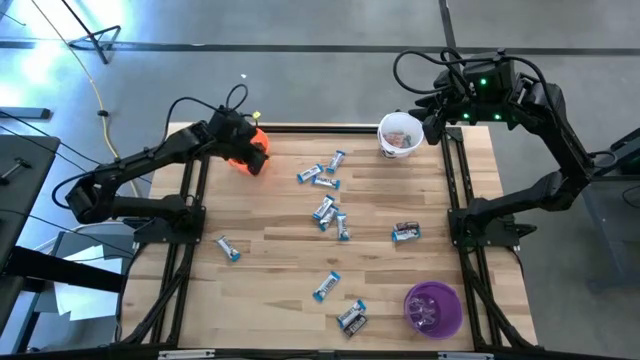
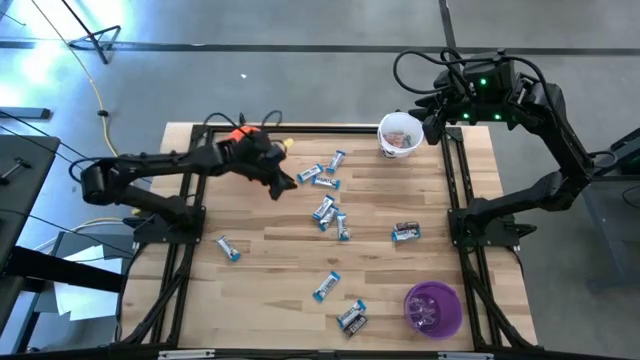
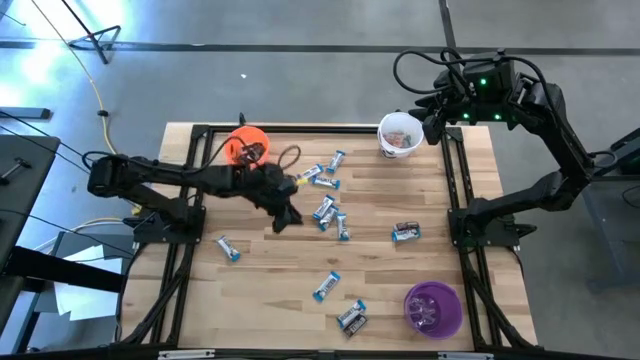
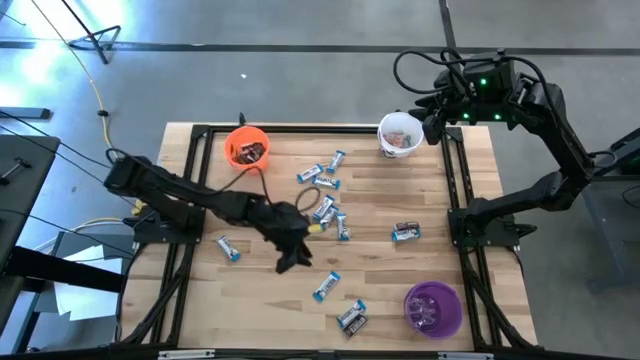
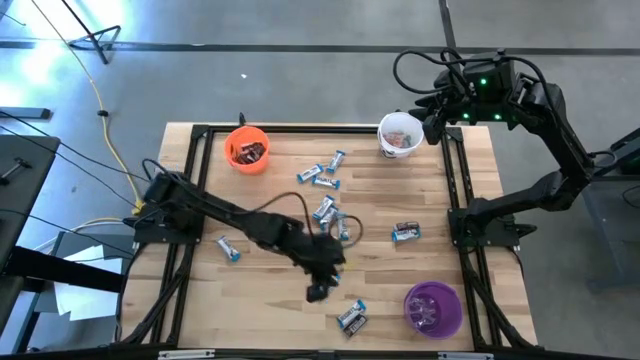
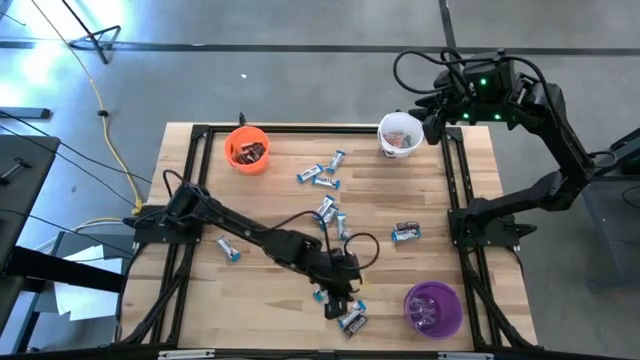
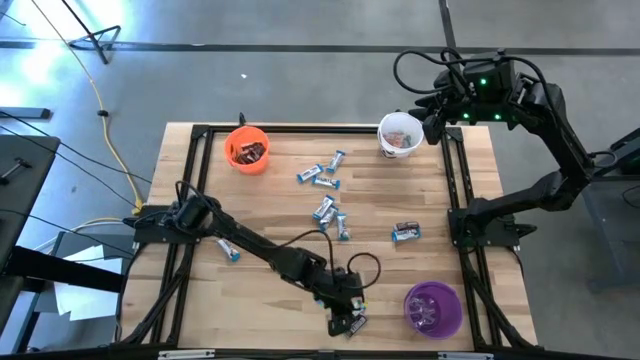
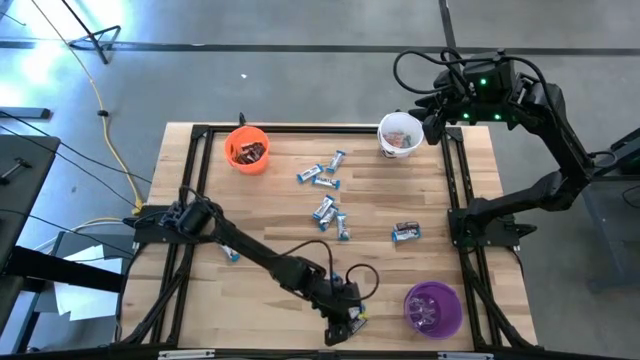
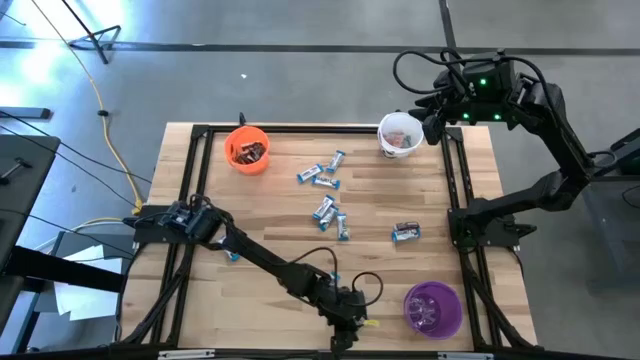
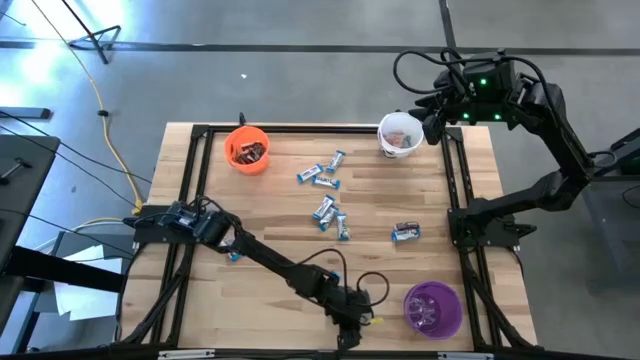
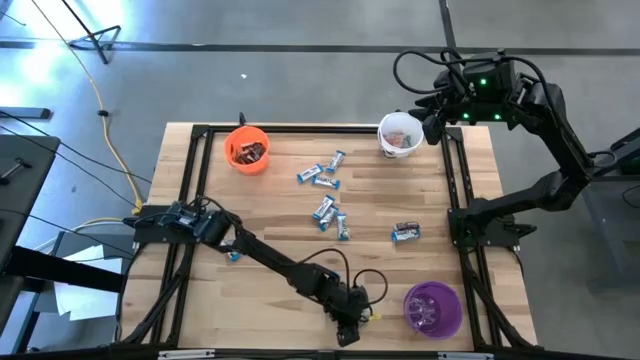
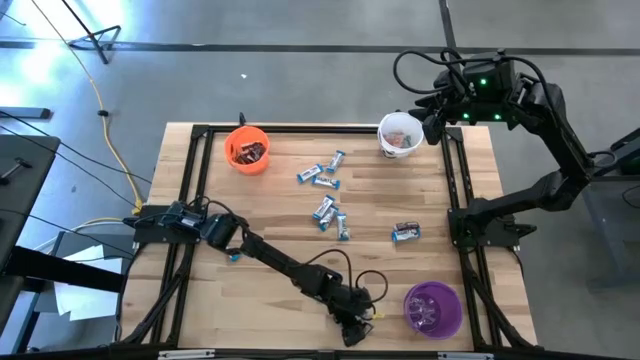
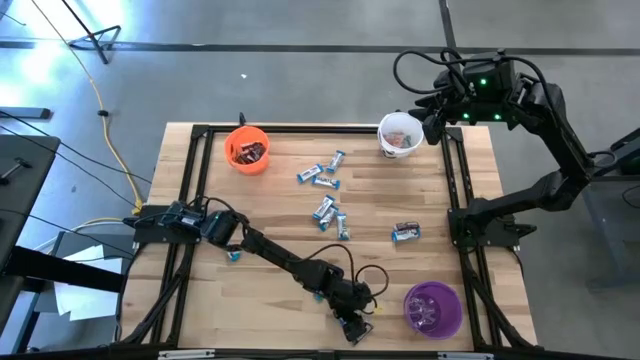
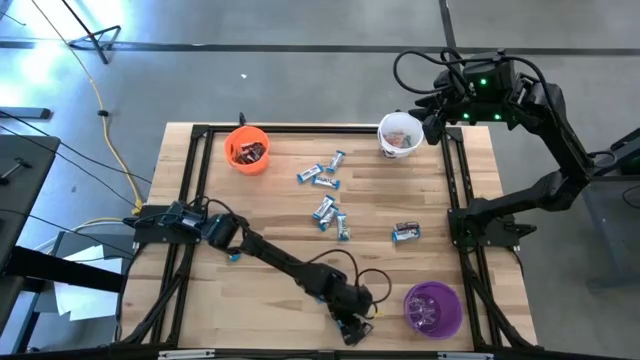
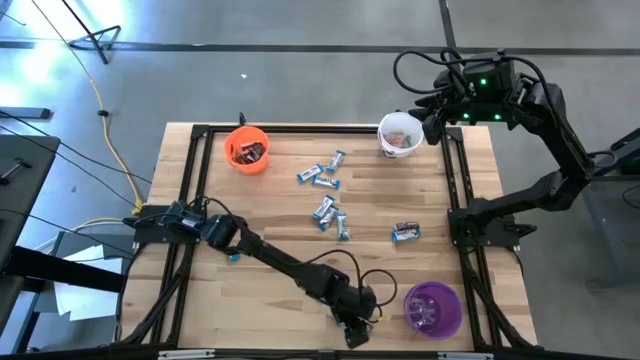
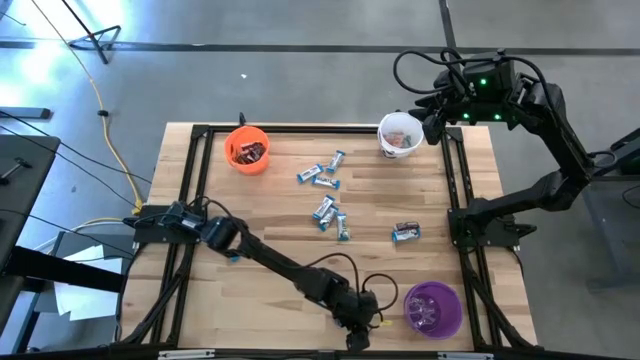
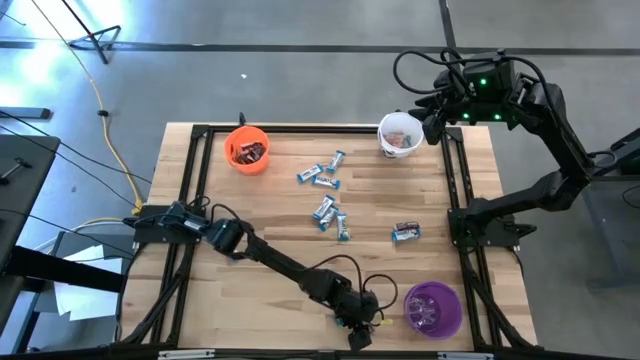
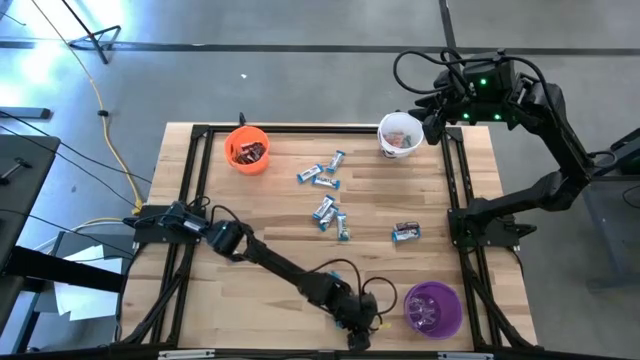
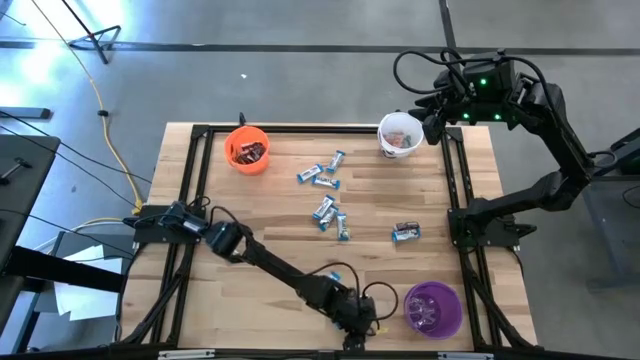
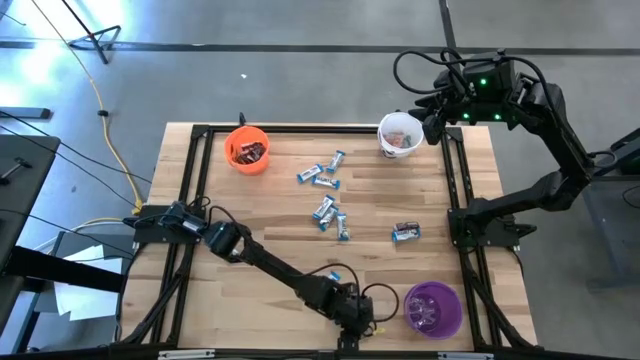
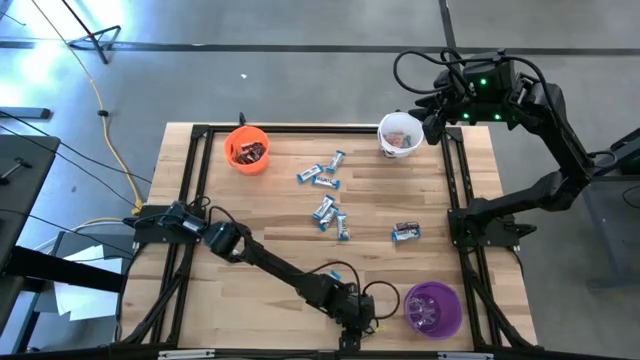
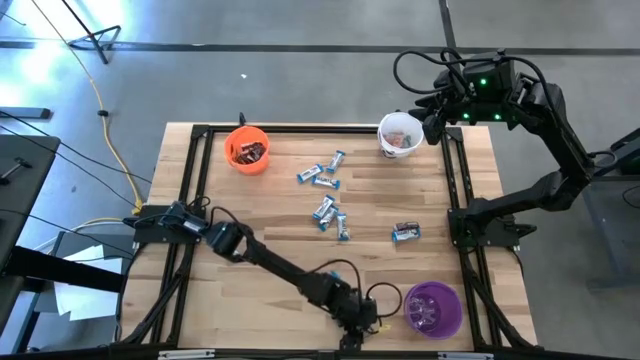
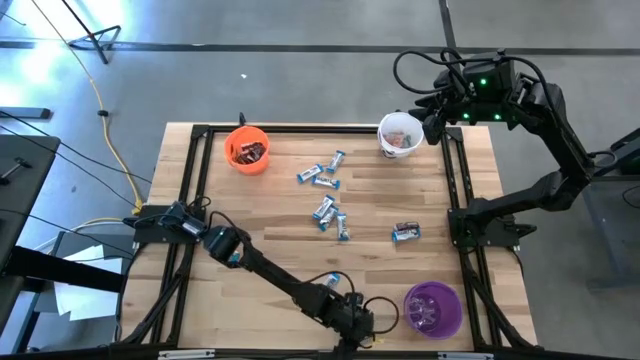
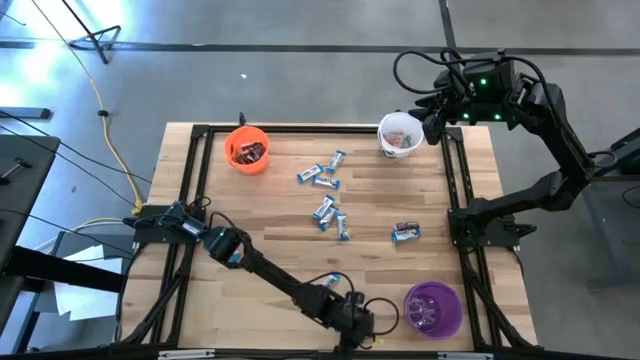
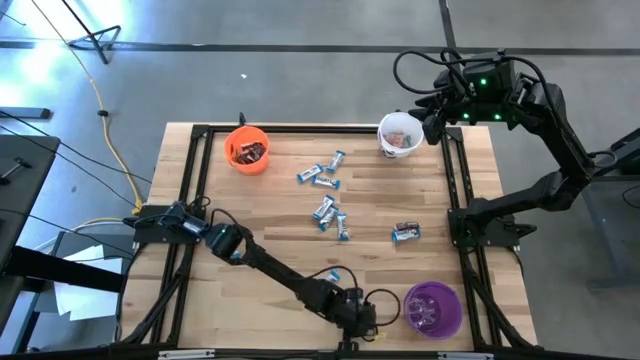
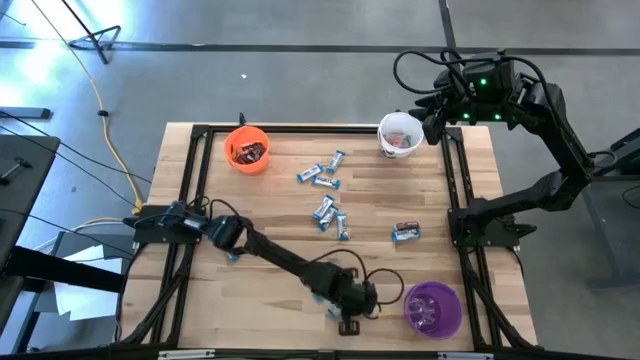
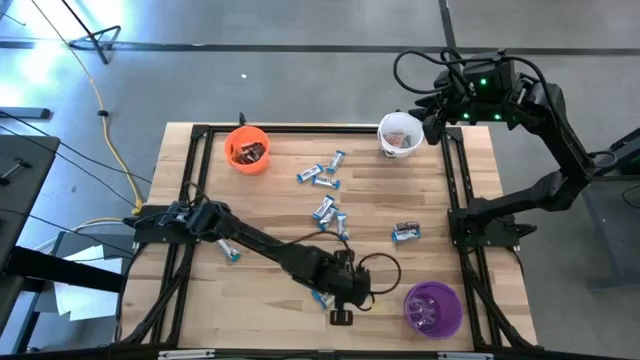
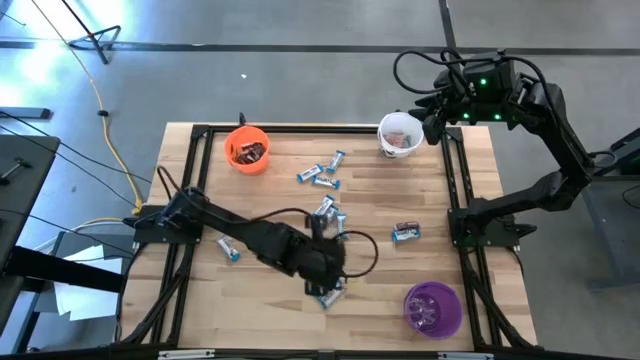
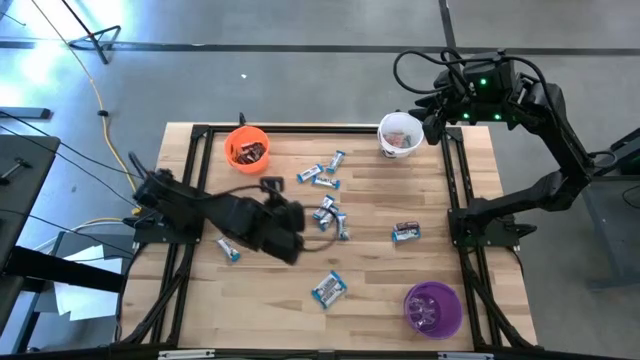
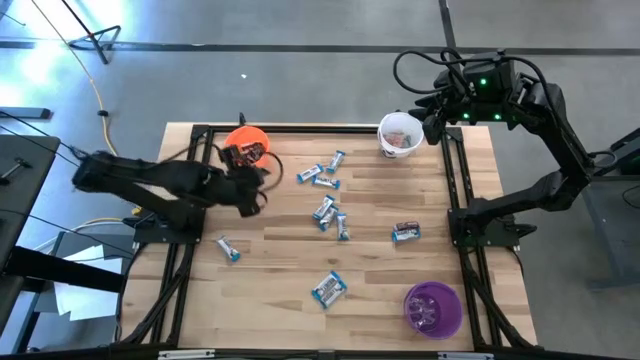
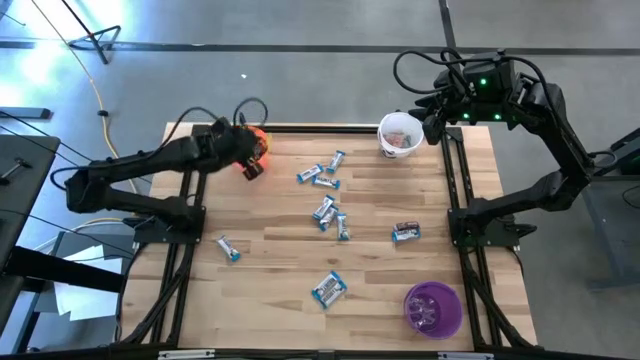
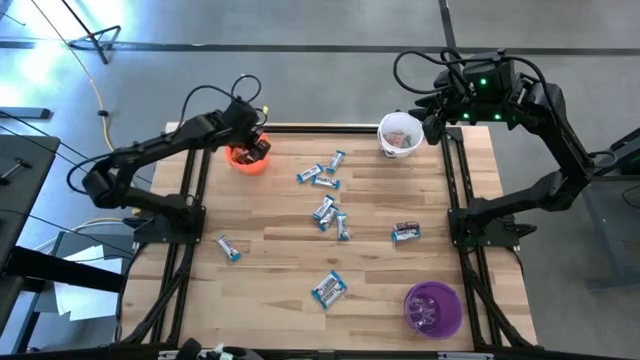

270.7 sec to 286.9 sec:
Task: Sort candy
Put the brown chocolate into the orange bucket

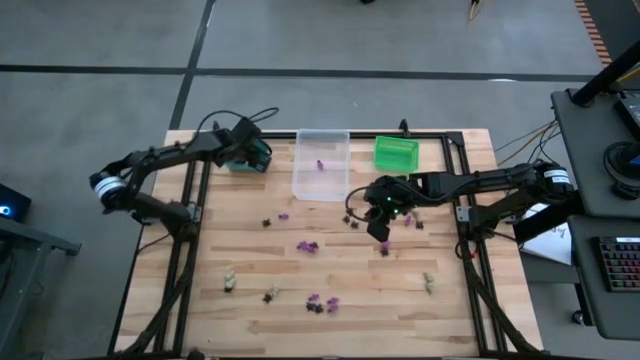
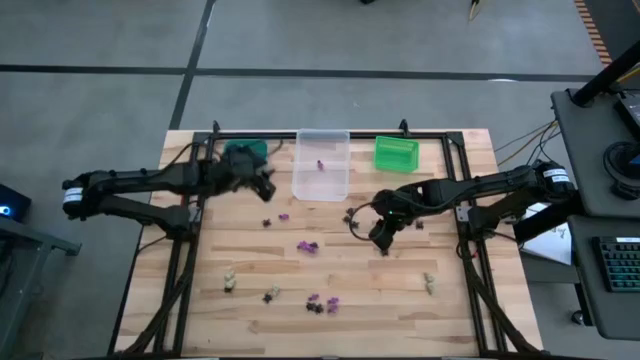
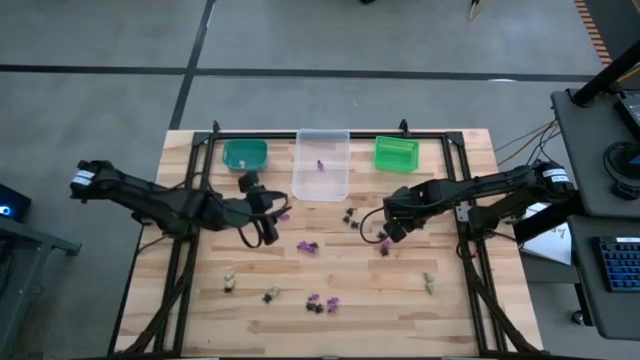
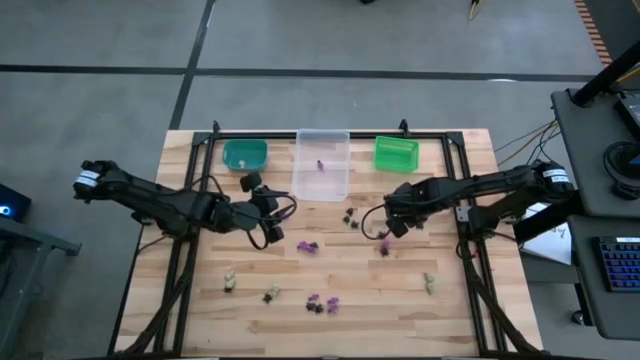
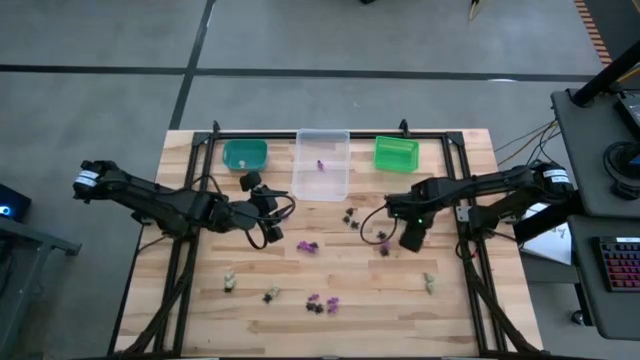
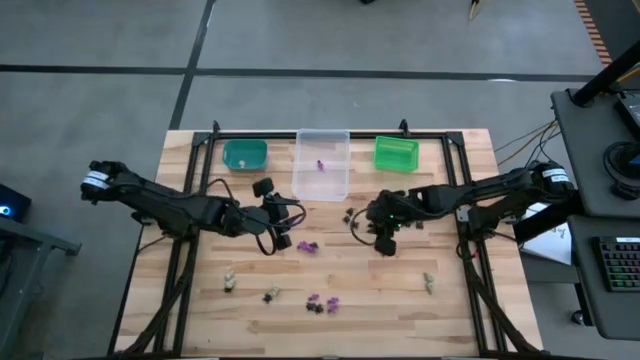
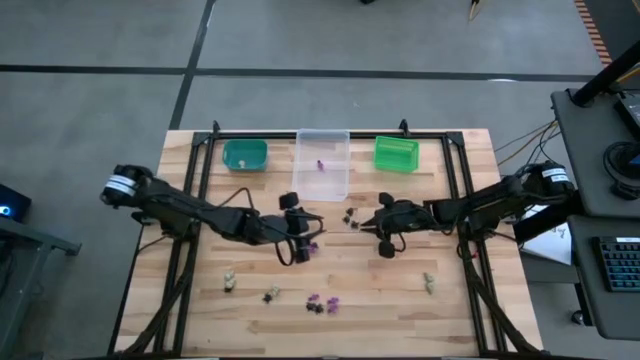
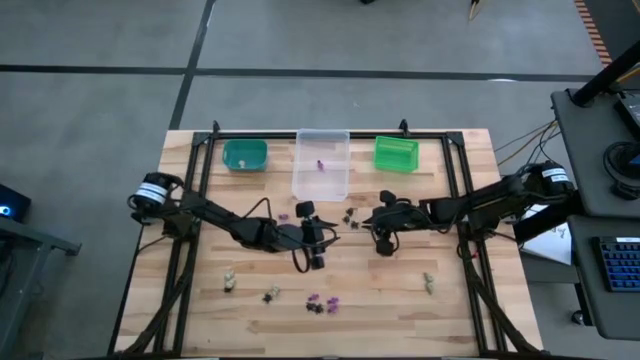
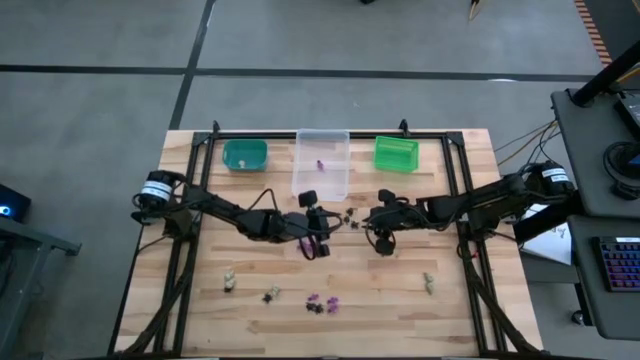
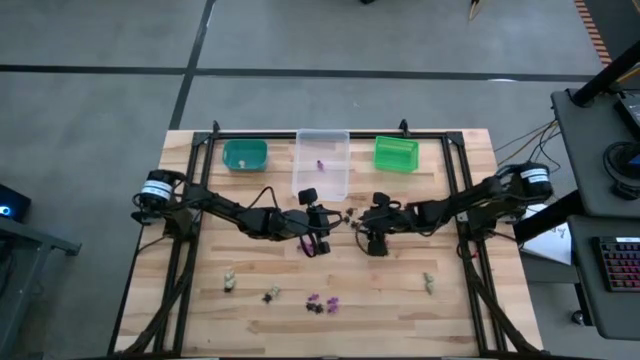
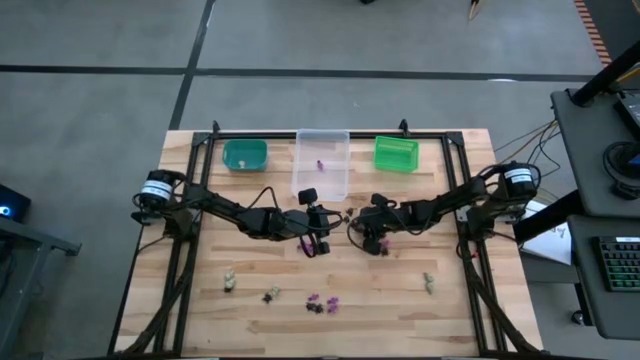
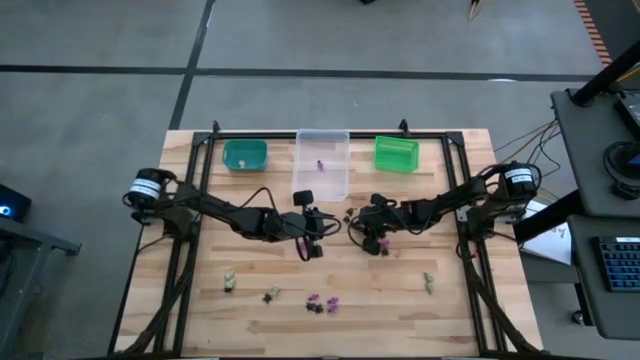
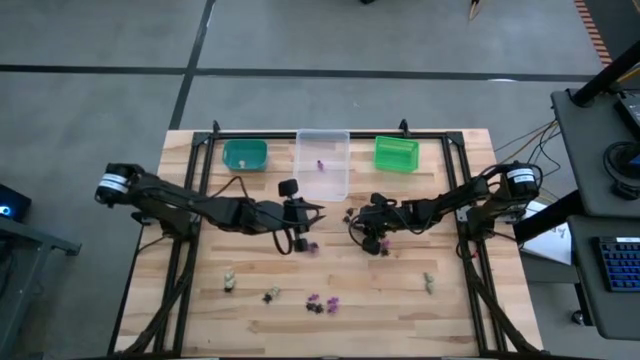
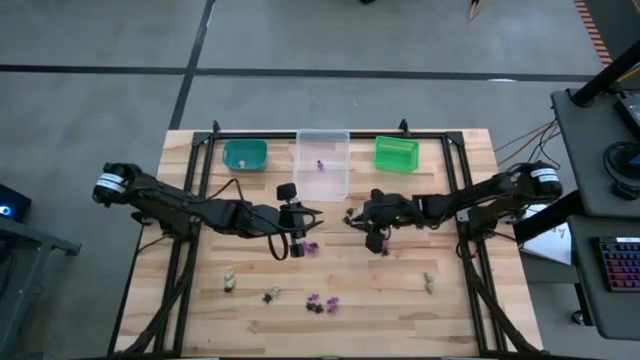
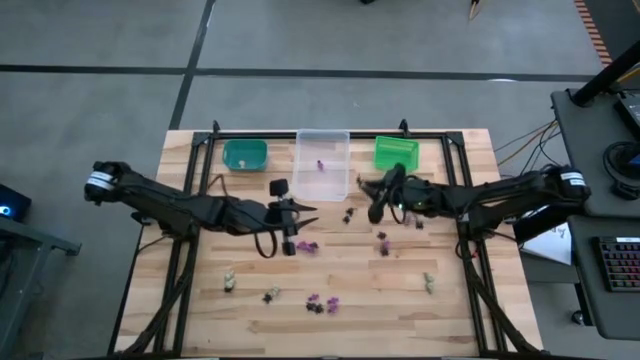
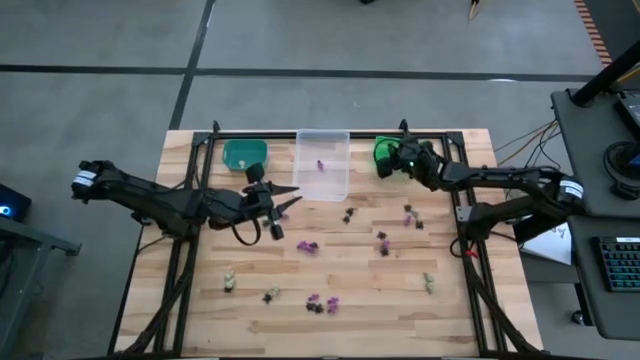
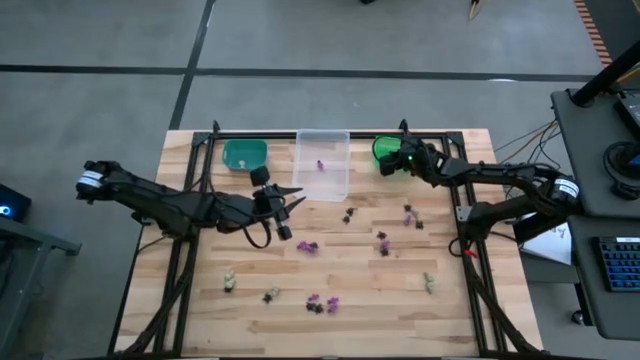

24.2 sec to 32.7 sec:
Task: Sort Halloween decoration
Put the black spider toy into the green bin
